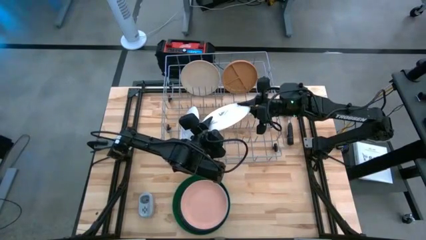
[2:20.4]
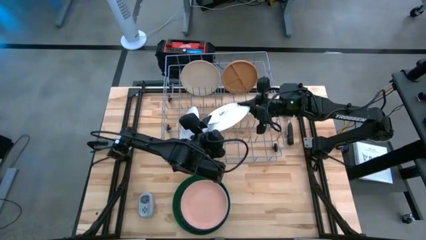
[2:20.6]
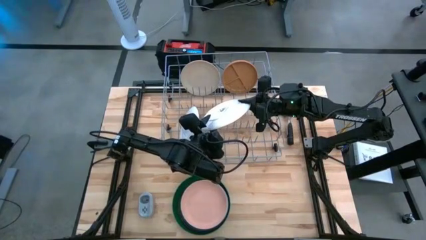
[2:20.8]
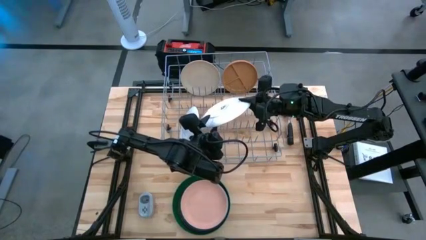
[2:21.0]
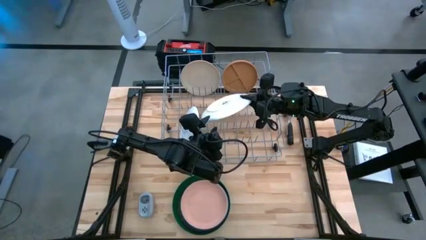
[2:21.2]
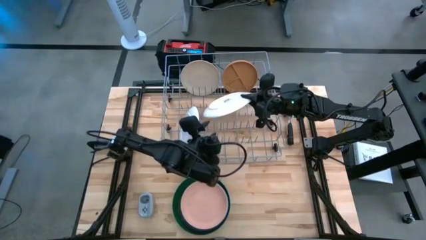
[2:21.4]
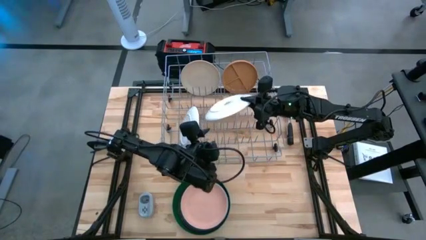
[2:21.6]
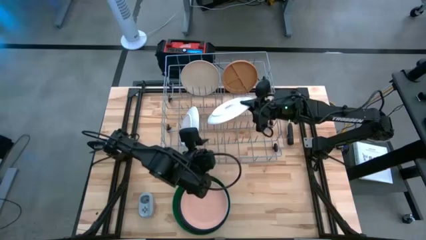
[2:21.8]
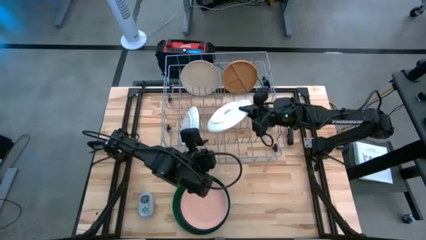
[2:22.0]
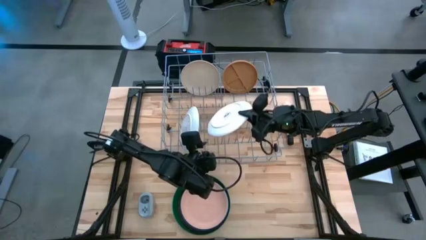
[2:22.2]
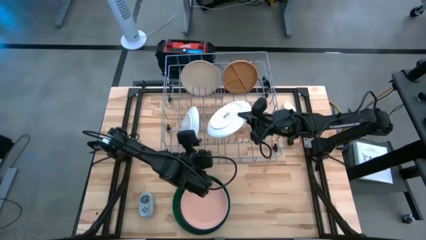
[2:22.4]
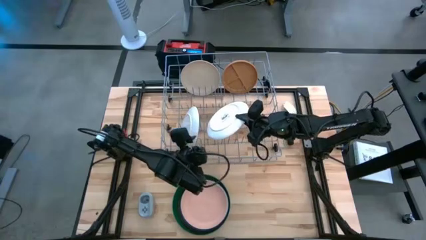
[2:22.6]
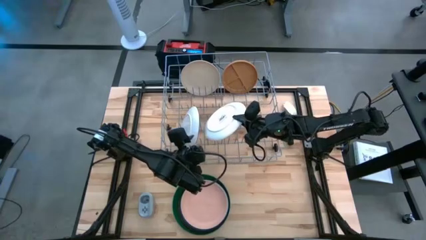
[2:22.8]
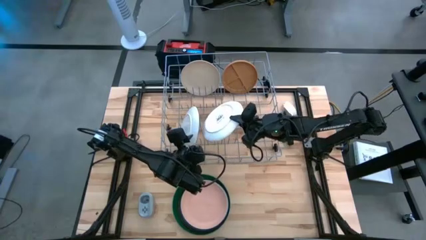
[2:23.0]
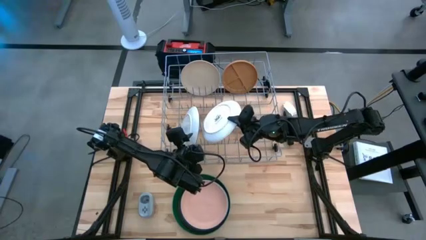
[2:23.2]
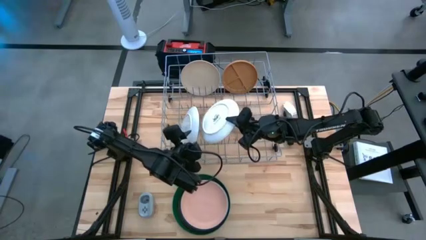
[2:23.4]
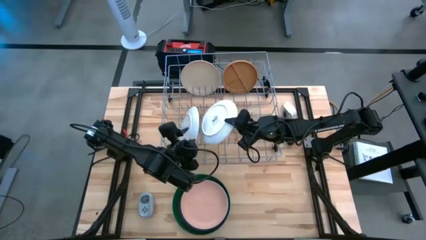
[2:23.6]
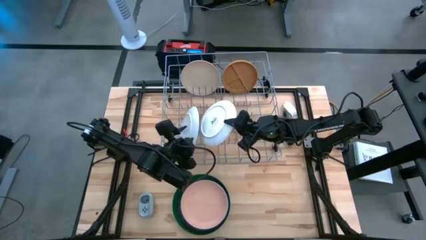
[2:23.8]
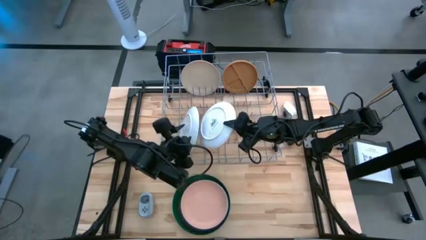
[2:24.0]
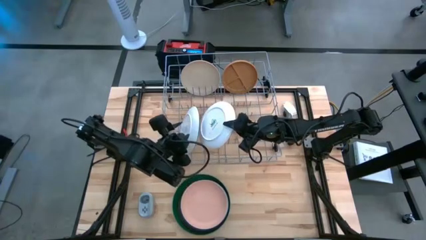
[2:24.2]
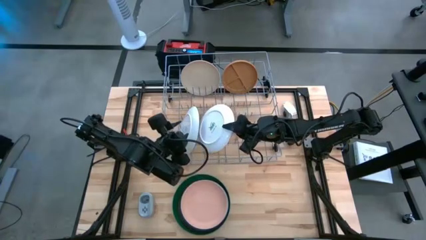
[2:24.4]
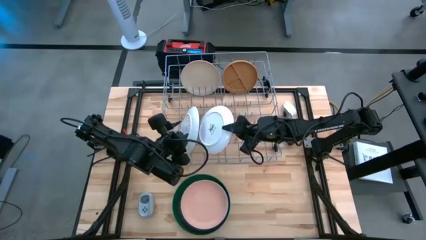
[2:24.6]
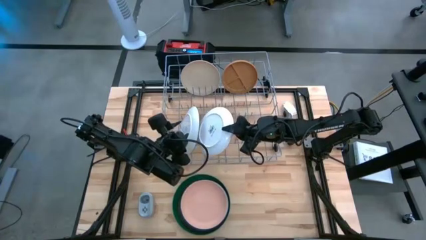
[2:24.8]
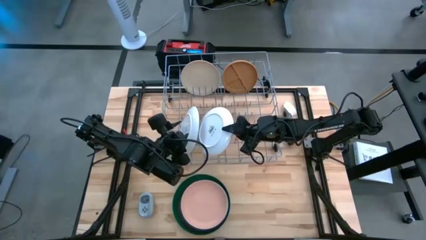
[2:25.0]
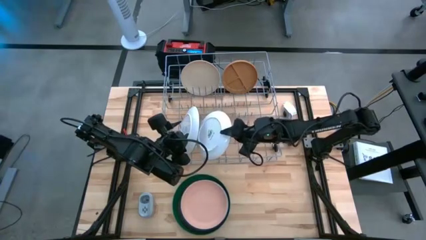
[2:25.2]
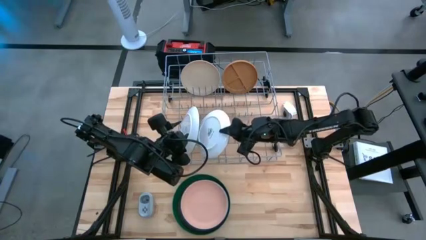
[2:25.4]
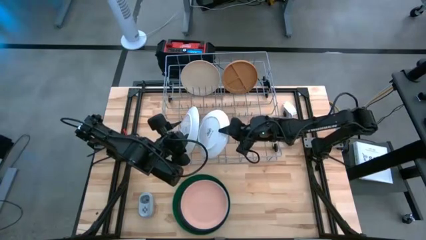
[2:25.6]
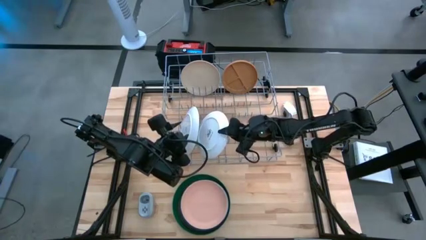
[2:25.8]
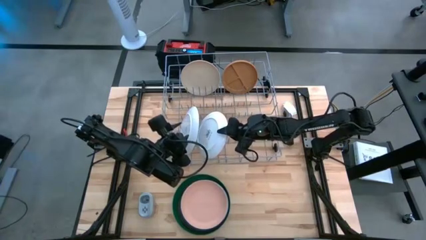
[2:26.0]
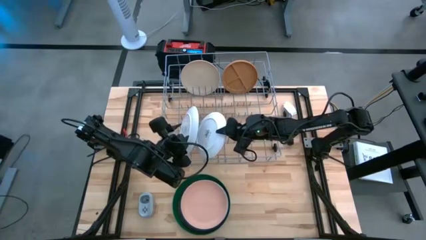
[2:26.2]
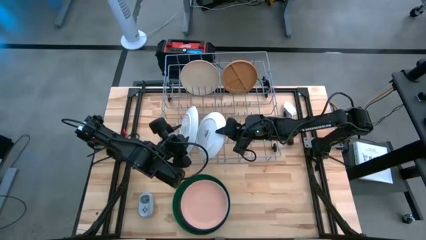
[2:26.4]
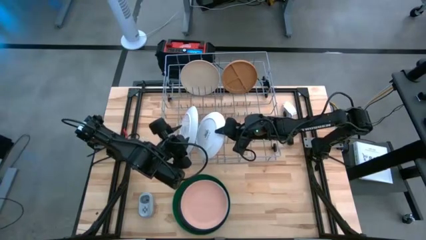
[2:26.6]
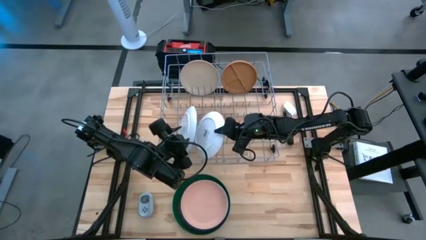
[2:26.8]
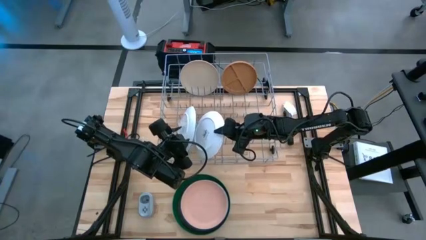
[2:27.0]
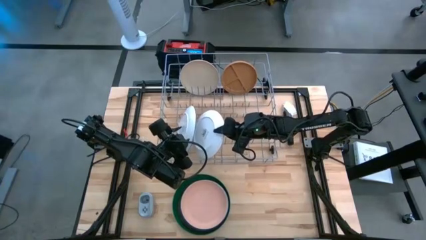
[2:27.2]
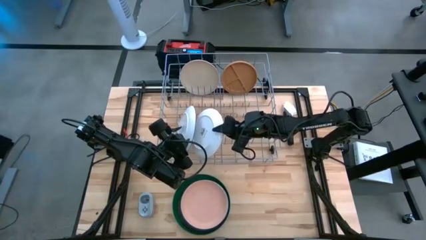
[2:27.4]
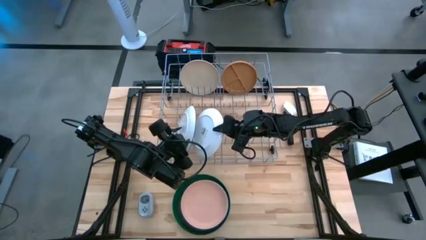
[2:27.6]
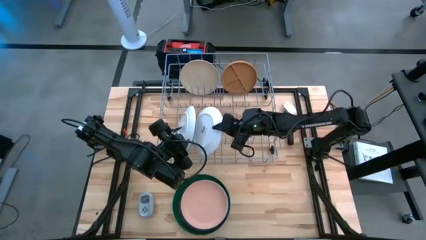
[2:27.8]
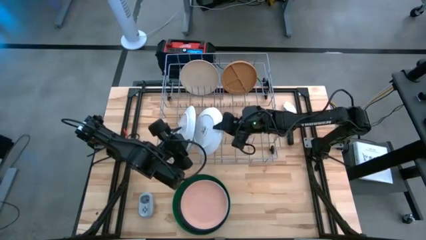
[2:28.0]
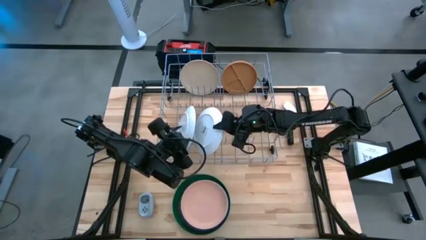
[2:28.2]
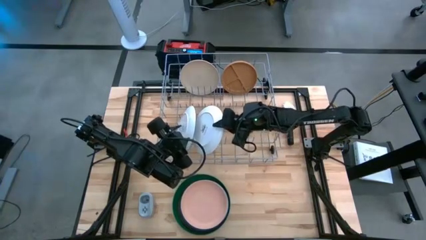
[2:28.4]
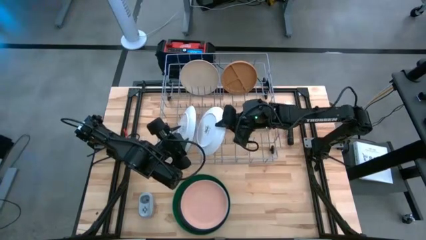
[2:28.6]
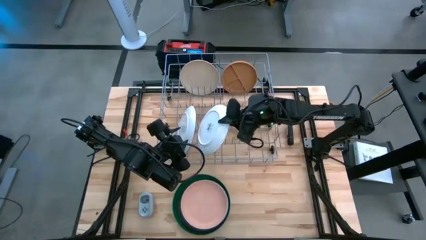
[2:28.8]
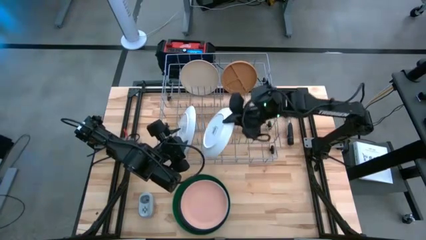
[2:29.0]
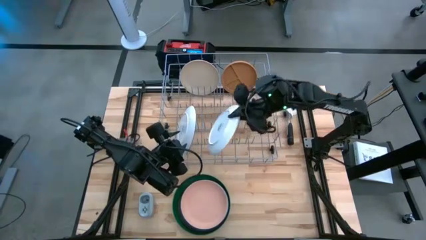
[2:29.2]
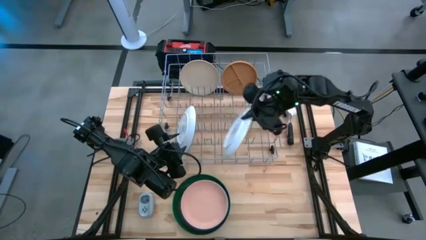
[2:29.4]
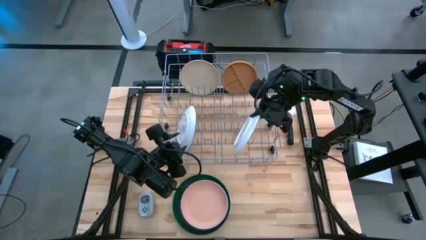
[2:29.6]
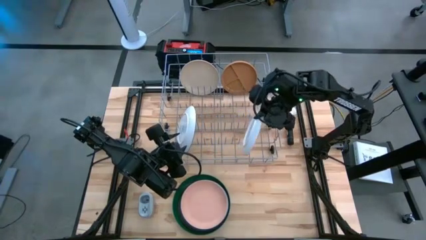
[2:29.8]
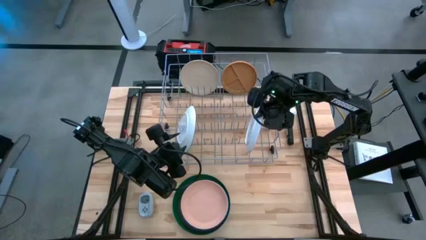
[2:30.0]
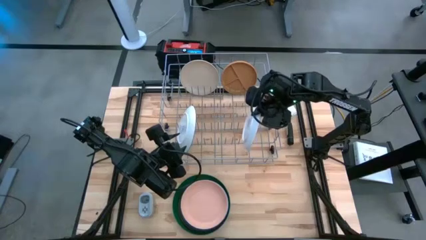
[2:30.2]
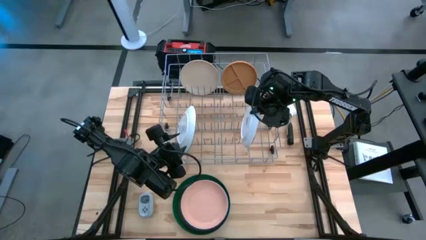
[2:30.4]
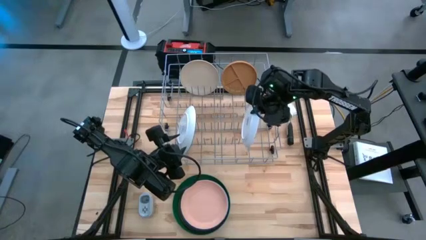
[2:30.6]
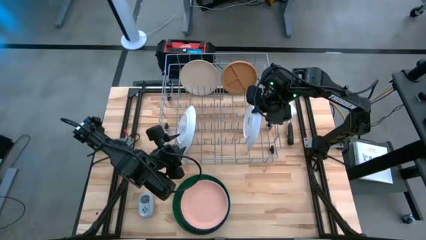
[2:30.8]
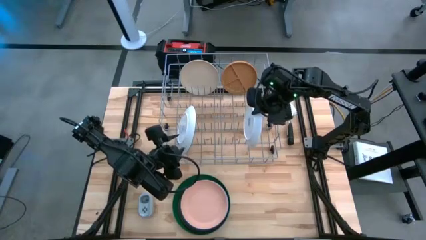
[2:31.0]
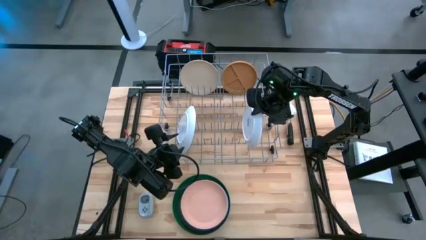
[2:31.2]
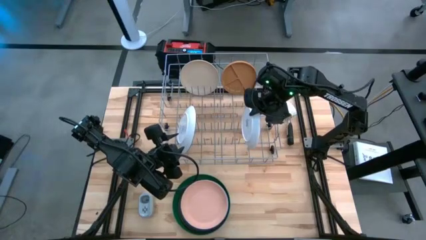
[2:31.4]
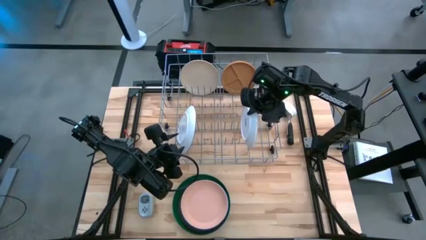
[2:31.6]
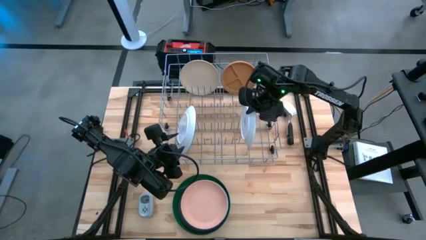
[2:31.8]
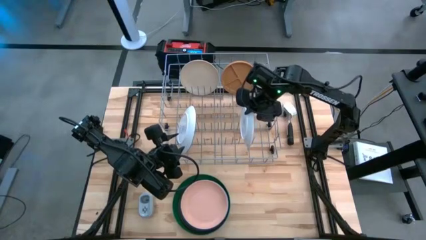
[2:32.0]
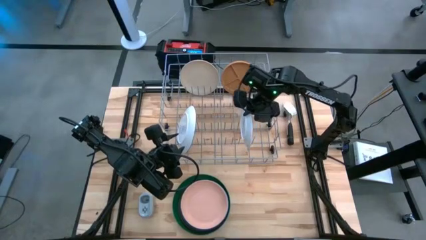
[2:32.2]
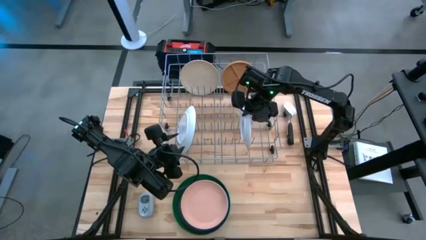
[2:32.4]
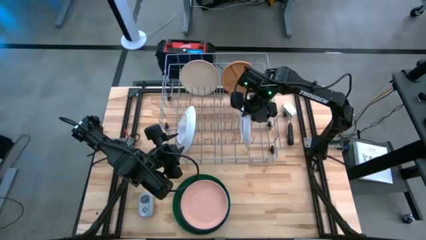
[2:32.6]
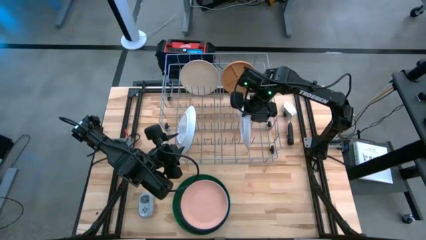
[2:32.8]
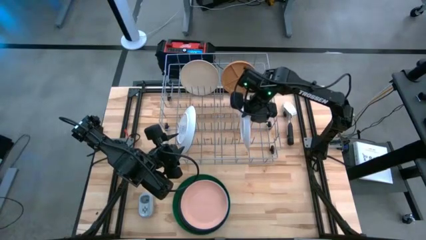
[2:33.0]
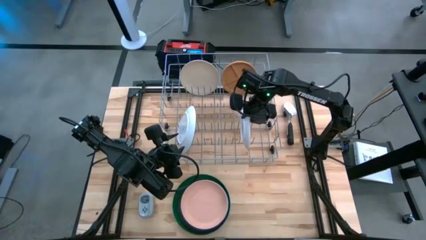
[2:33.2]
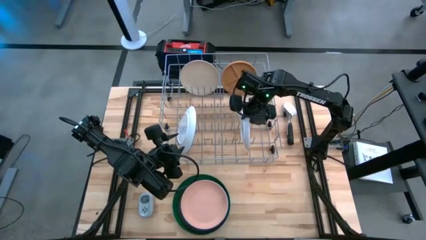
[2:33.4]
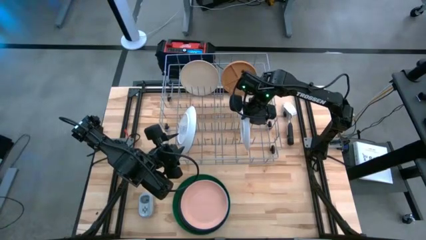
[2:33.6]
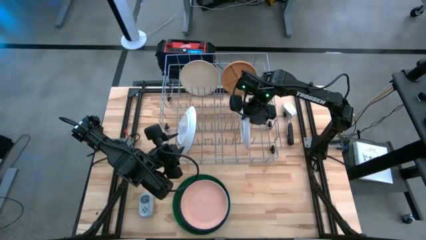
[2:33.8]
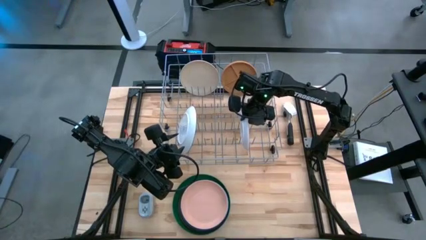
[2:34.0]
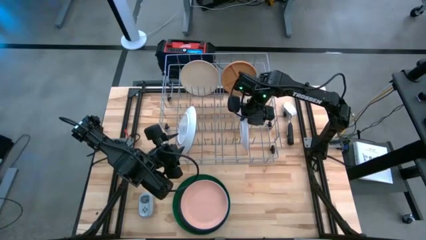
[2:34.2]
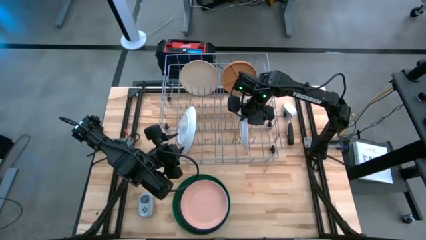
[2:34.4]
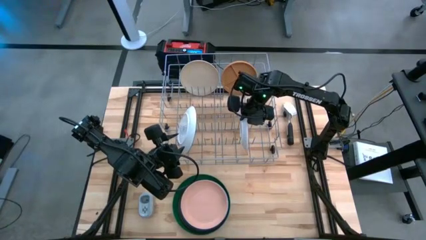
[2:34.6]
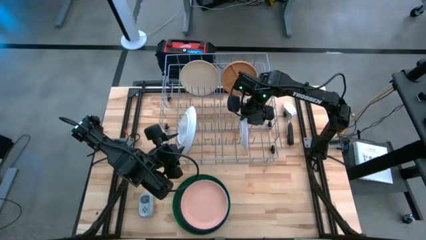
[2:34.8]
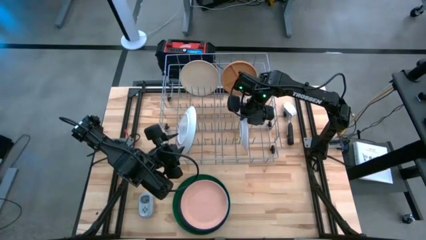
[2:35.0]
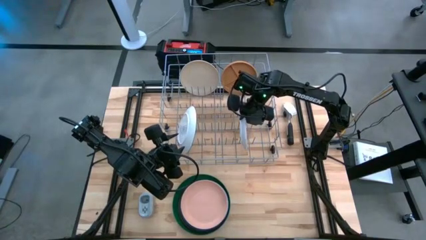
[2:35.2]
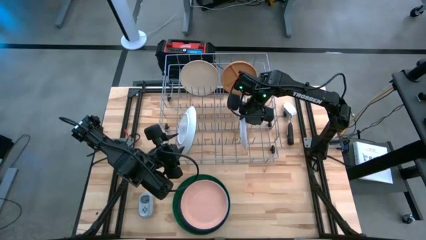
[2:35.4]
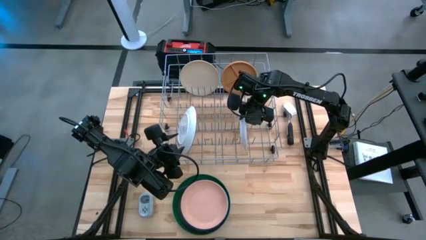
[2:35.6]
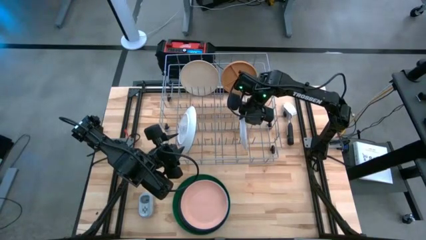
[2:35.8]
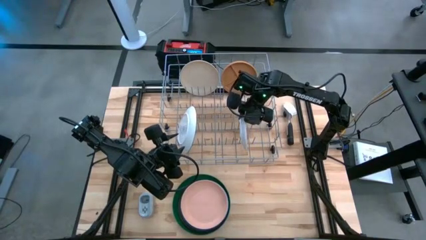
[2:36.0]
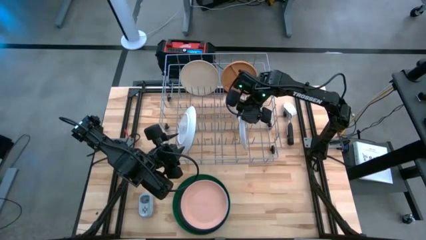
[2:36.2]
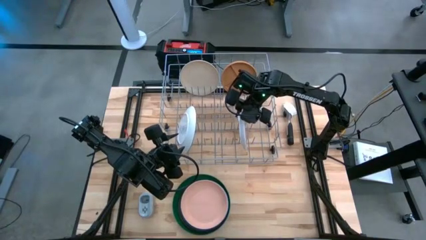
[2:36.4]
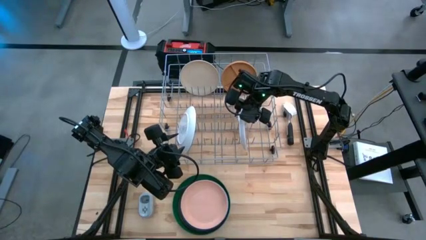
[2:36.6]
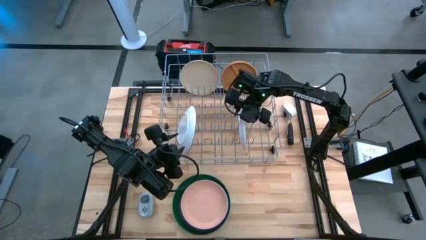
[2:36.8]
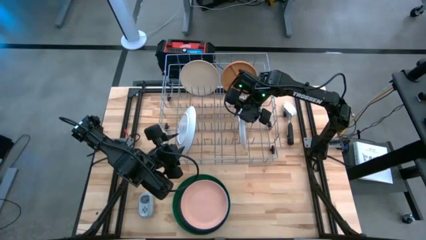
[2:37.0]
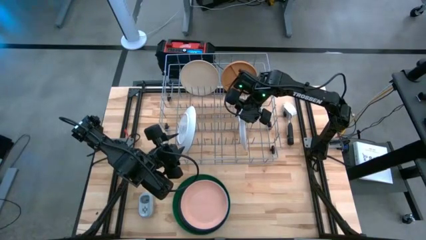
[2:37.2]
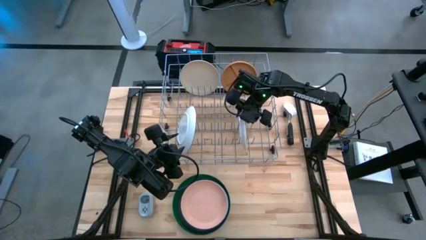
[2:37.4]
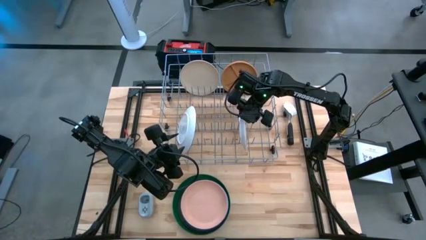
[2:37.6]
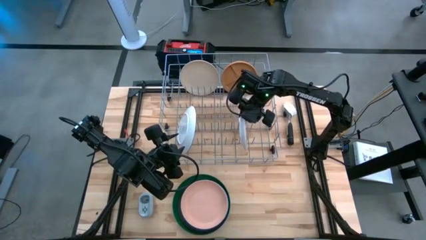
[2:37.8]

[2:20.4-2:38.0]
Task: Sort dishes
Put the white patterned plate into the dish rack
